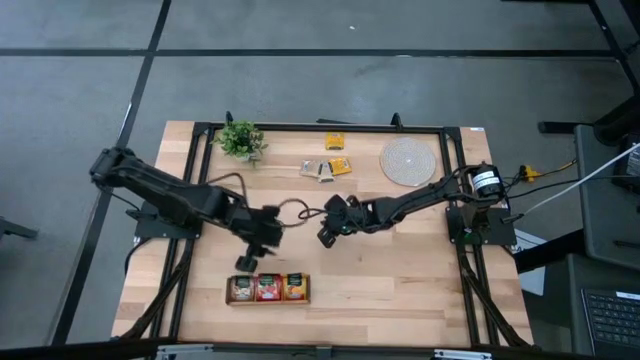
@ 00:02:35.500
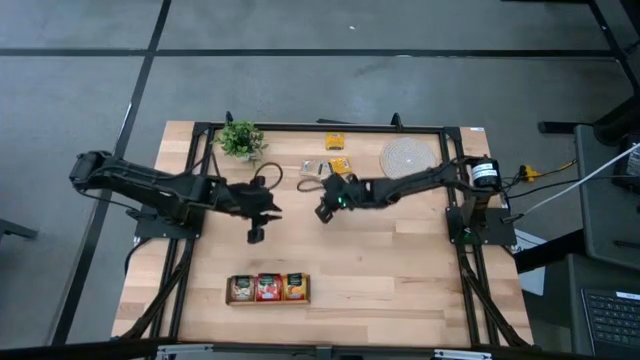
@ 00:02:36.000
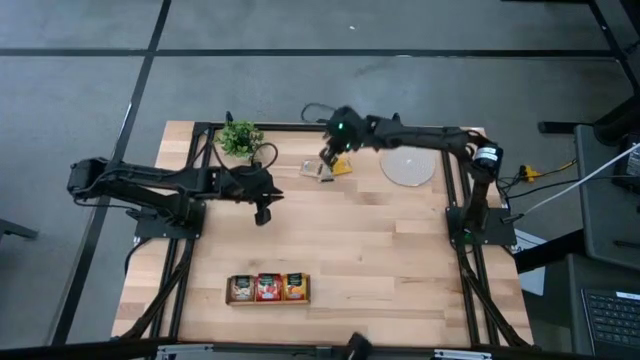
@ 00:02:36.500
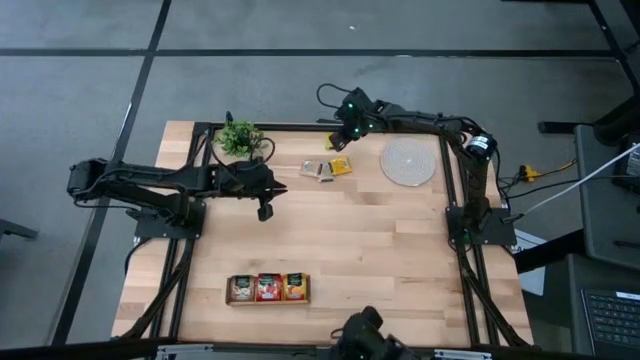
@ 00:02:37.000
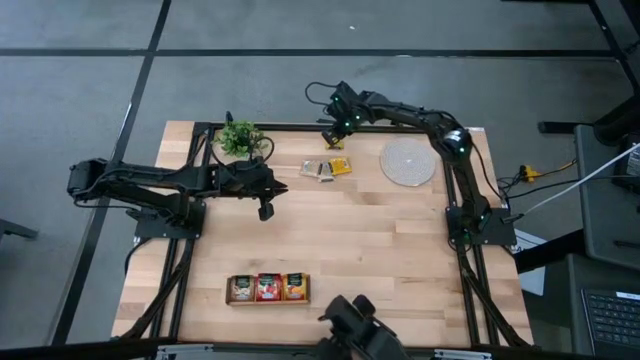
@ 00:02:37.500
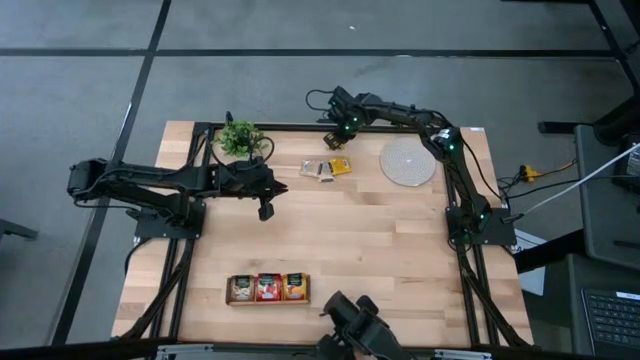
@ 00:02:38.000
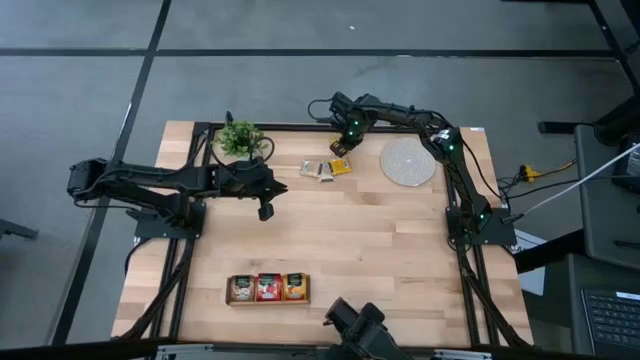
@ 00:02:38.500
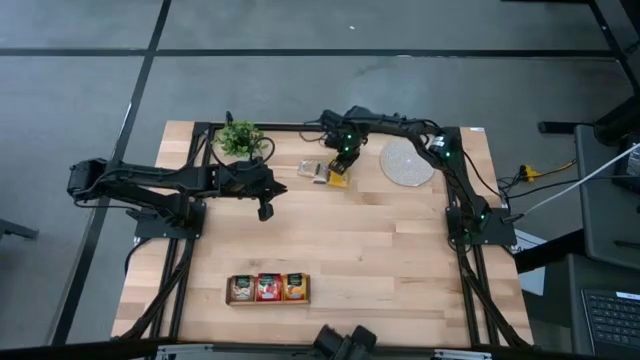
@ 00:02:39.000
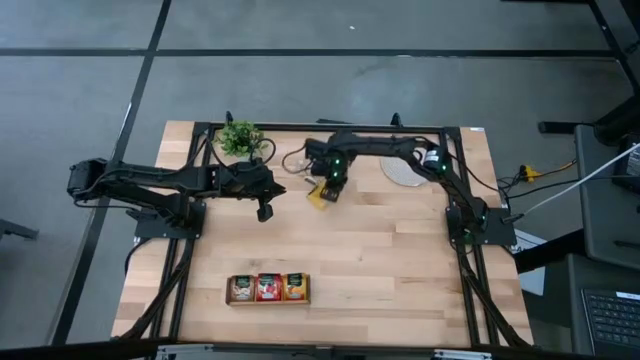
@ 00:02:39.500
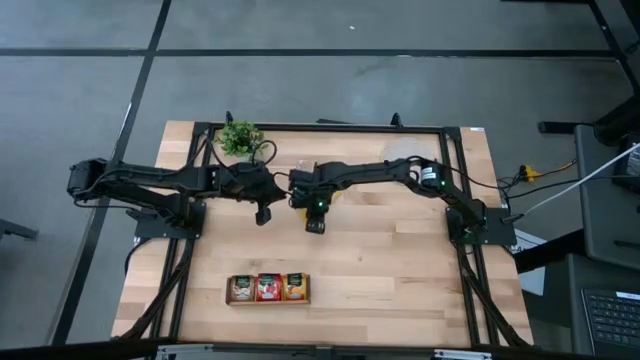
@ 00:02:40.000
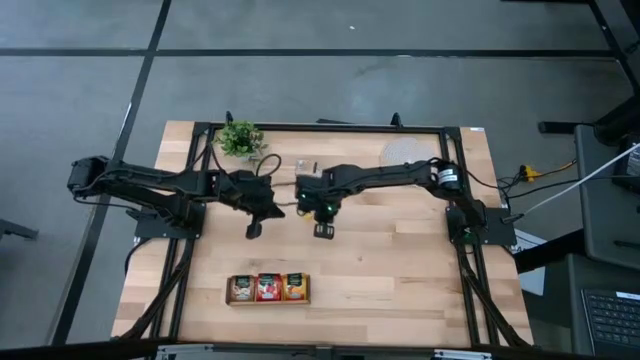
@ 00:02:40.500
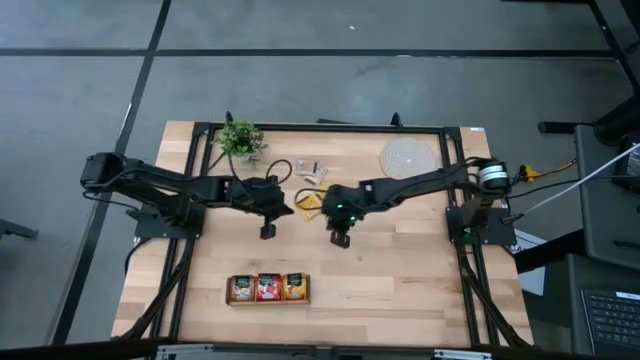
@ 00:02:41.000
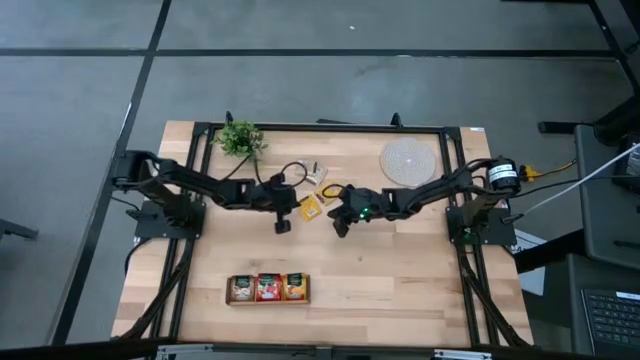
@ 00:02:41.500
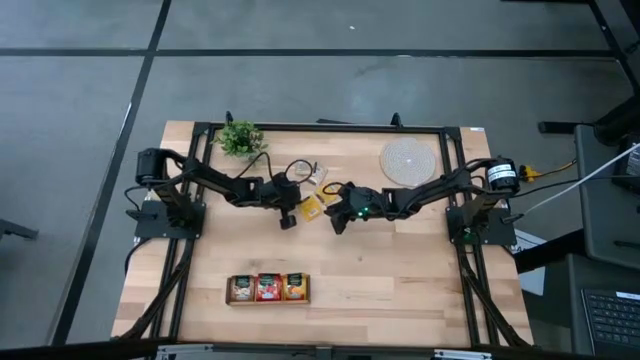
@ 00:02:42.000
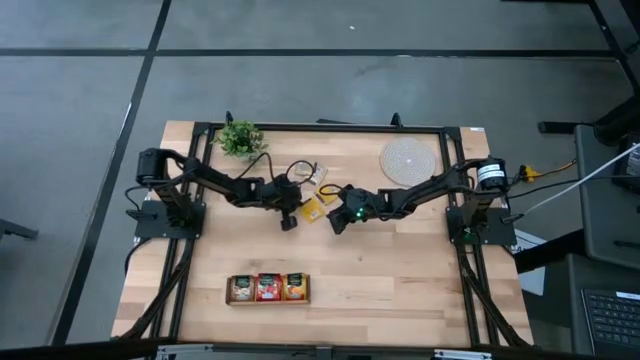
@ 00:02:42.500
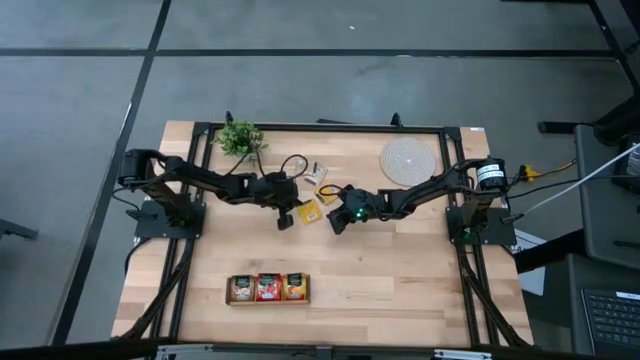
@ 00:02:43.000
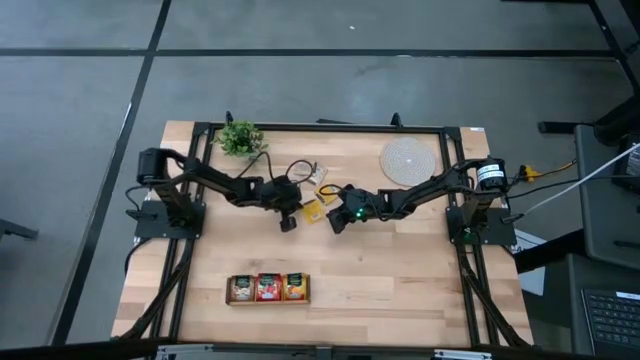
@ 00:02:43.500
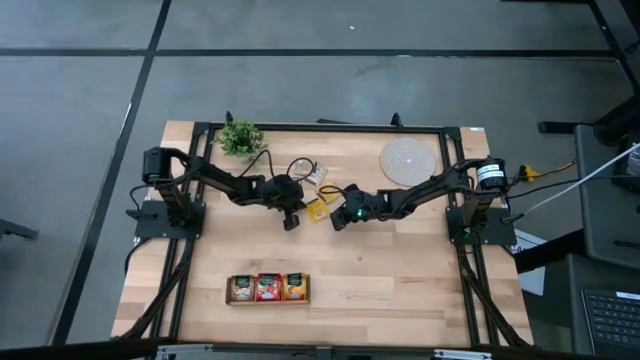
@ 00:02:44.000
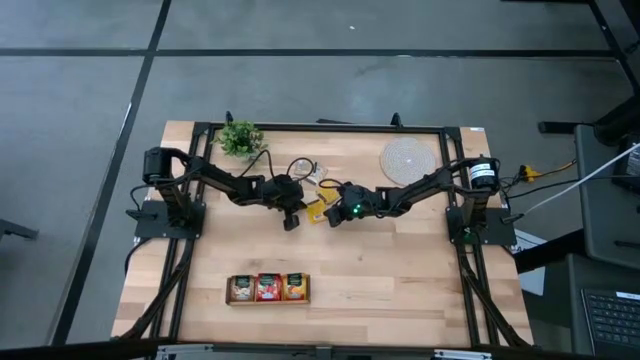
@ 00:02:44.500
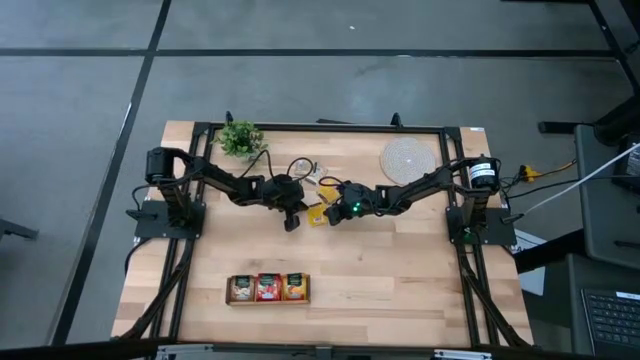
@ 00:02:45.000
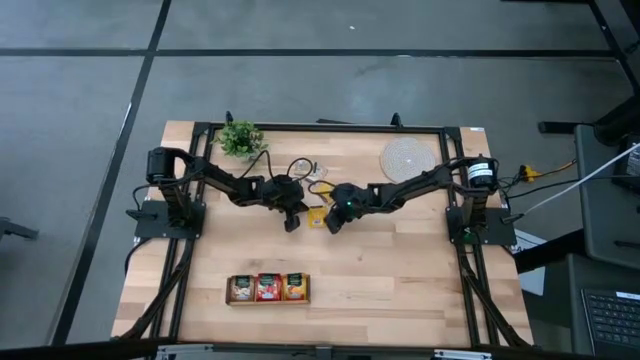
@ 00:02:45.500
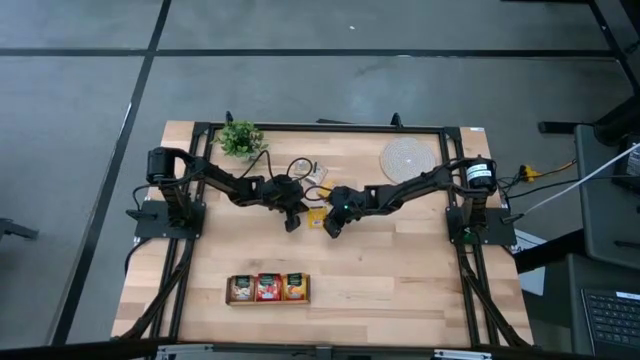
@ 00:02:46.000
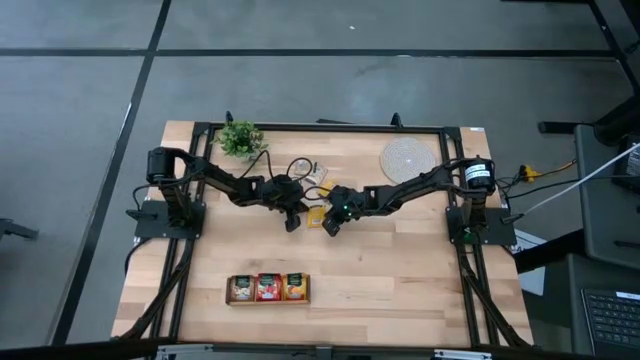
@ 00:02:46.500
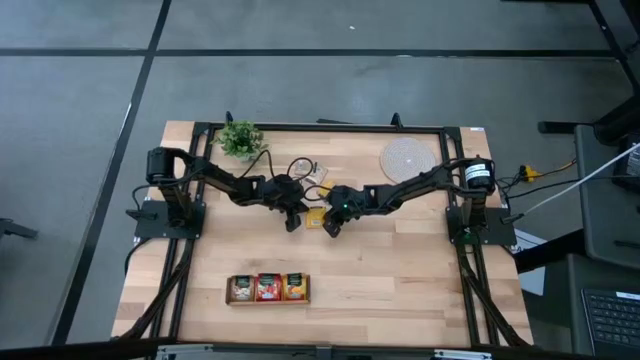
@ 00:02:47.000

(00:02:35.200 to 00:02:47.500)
Task: Pick & Place Tea
Put the yellow tea bag into the right section of the wooden organizer

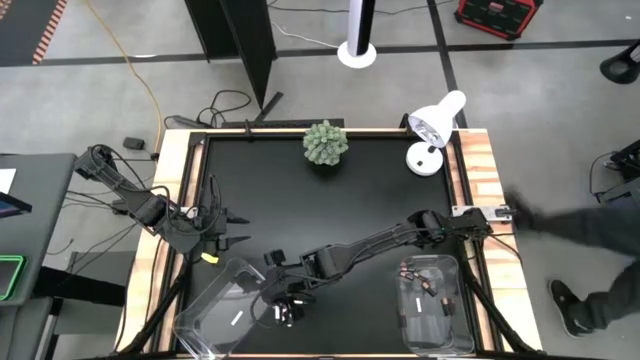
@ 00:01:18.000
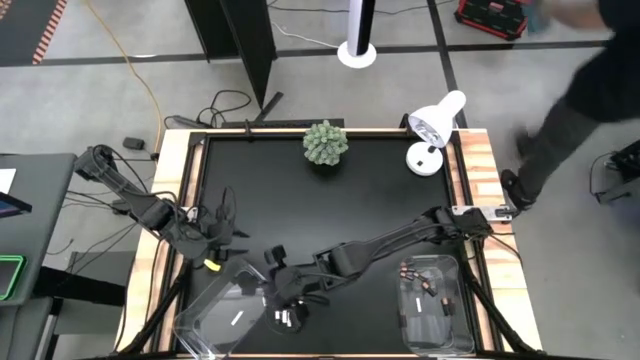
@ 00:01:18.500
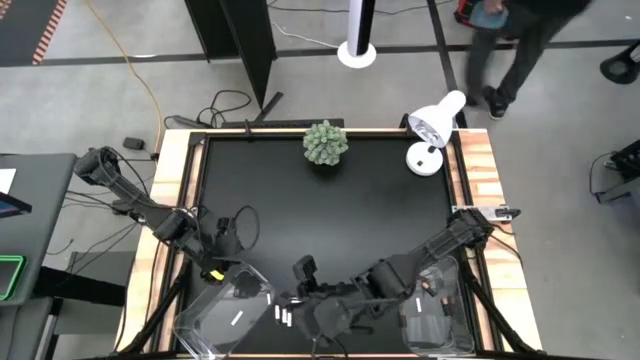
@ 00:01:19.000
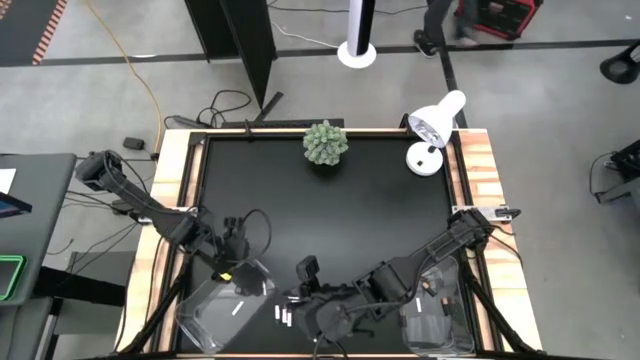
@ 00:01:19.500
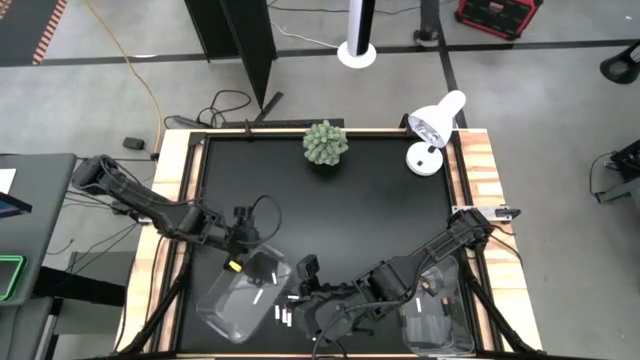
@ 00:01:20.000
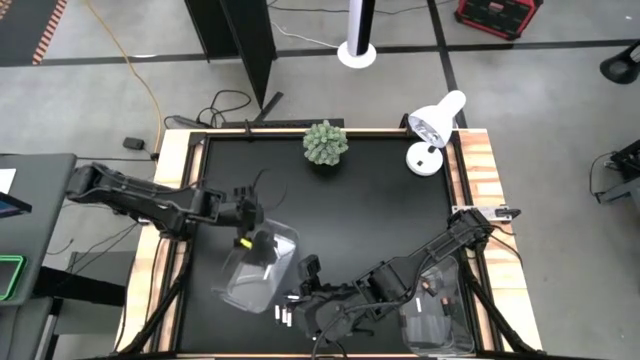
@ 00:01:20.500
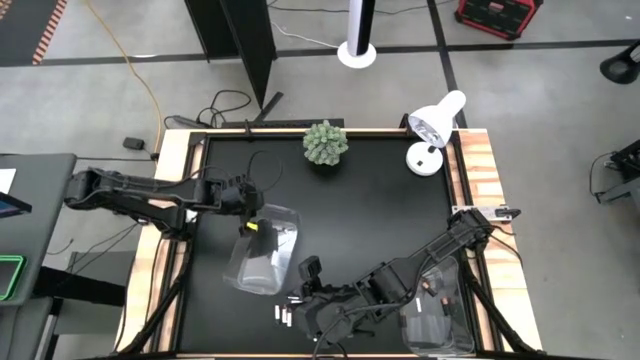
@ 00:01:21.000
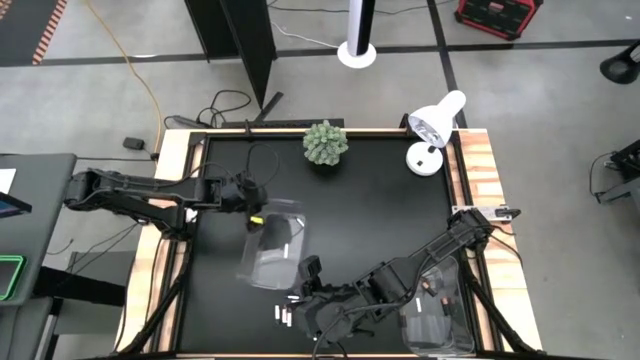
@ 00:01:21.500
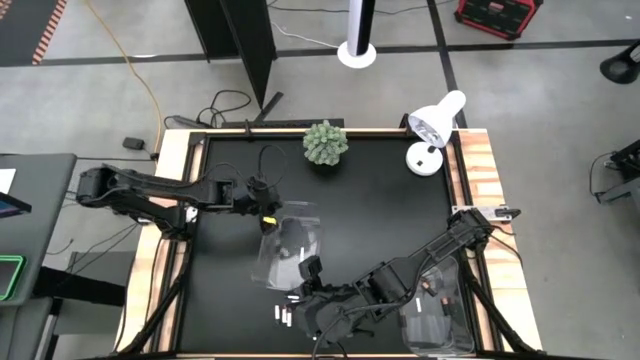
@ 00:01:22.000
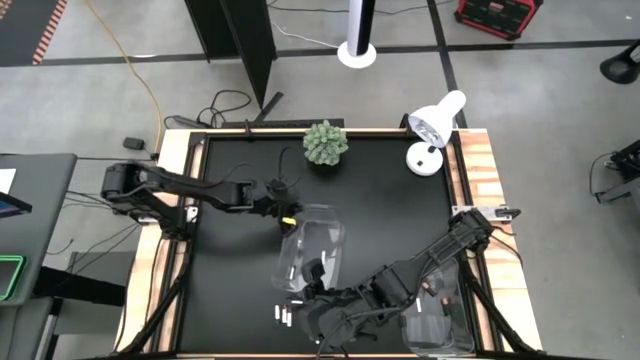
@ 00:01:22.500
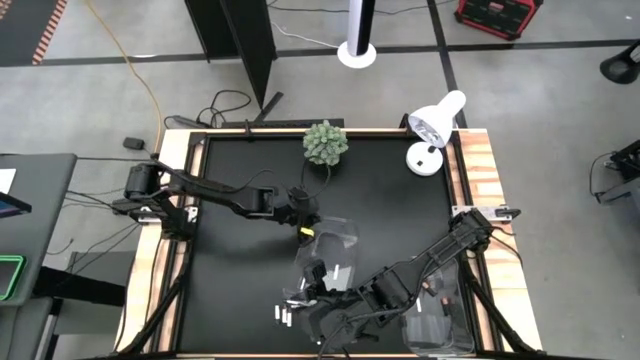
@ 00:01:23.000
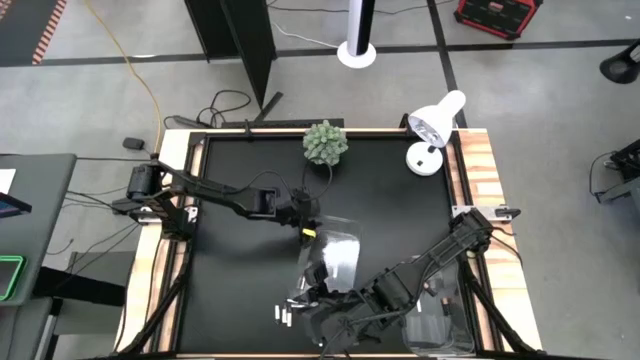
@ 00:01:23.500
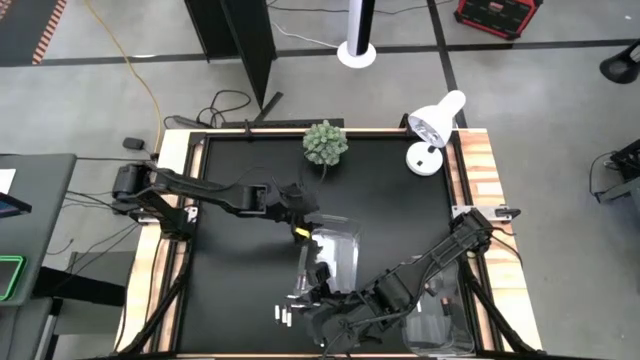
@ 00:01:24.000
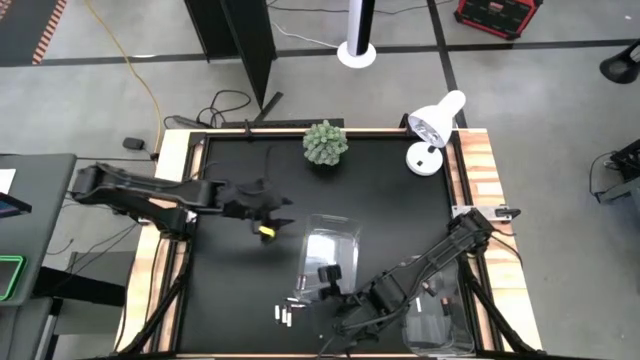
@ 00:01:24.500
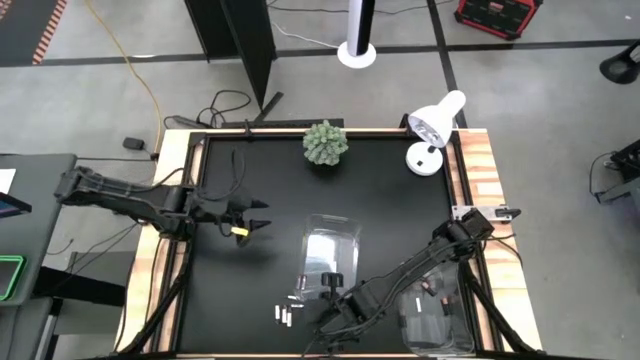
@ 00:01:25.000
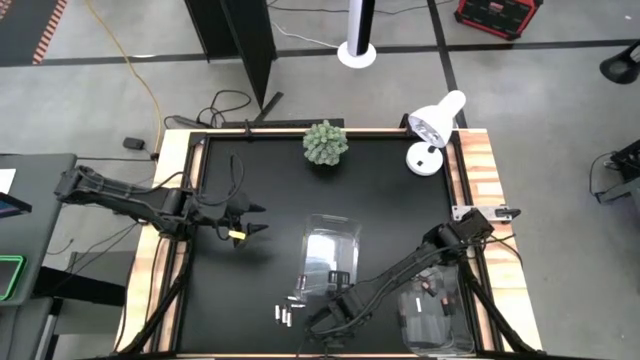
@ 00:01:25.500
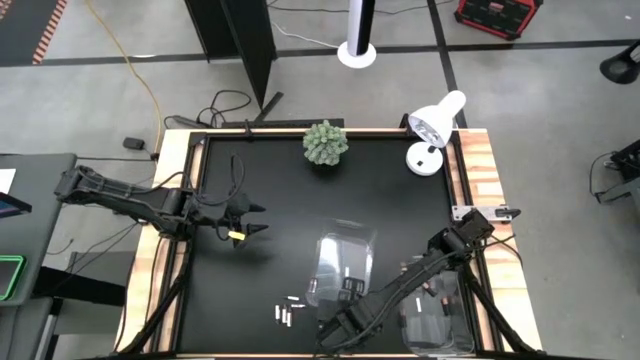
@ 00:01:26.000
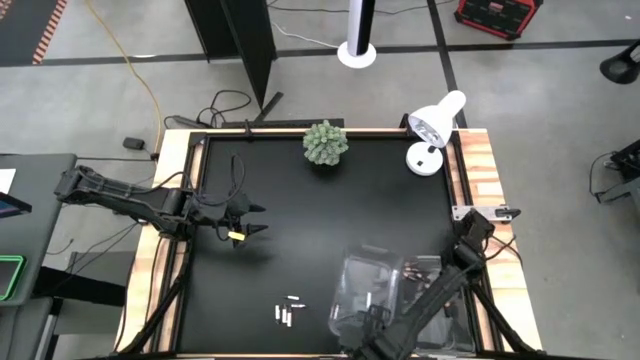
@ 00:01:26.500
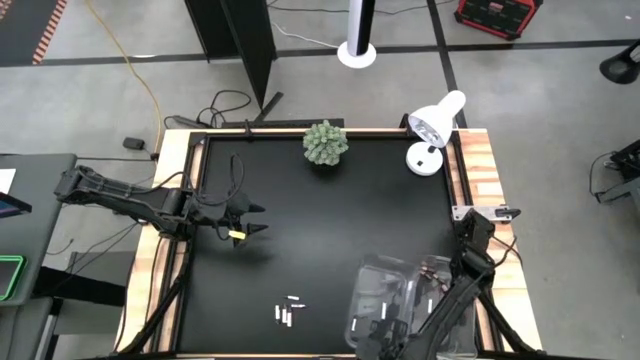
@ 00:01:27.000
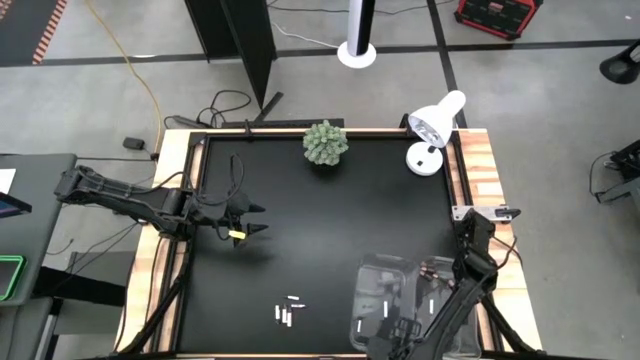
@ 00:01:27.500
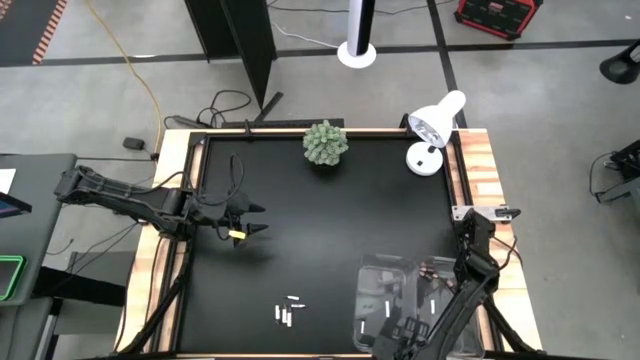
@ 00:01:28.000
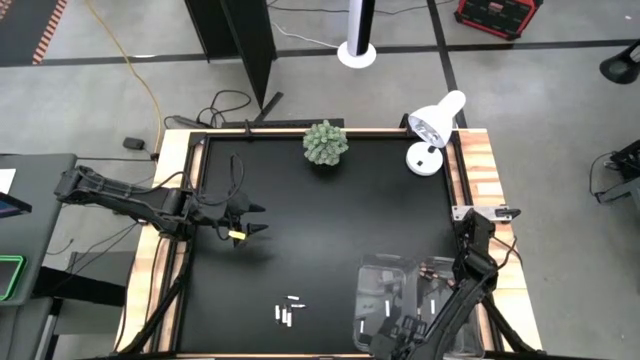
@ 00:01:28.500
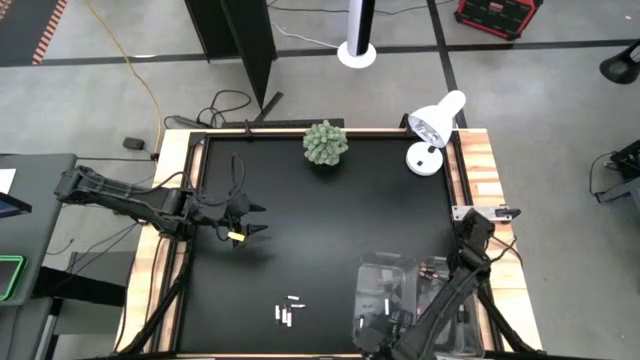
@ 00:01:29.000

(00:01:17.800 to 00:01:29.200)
Task: Sort batteries
Move the transparent bin to the bottom right of the table
